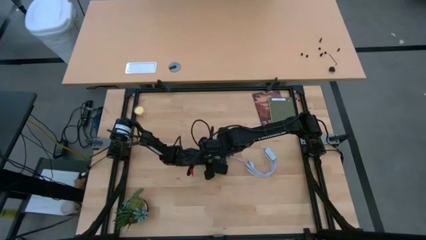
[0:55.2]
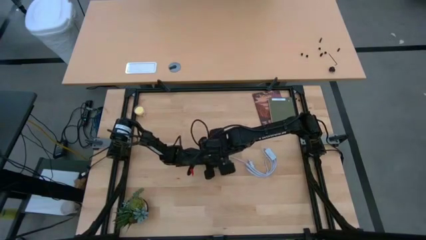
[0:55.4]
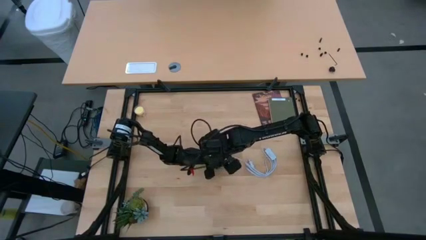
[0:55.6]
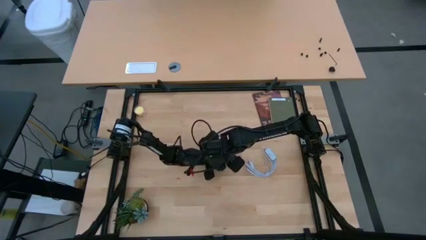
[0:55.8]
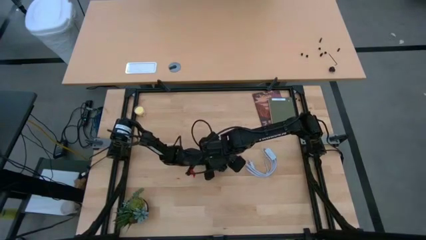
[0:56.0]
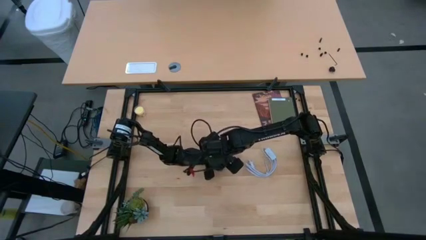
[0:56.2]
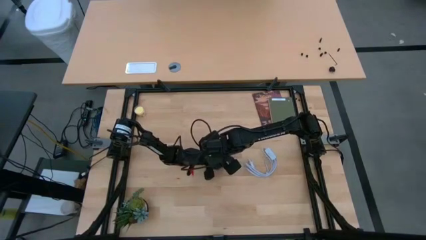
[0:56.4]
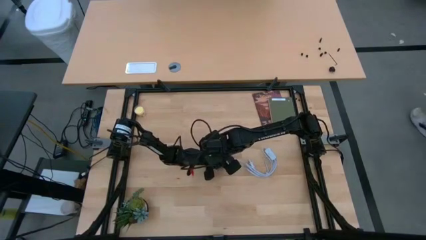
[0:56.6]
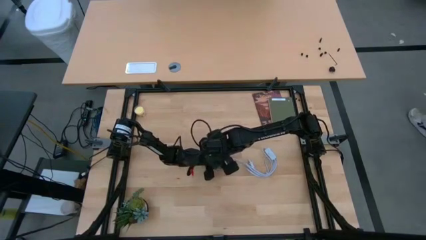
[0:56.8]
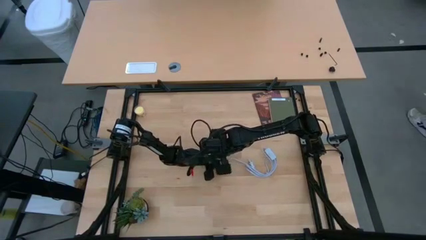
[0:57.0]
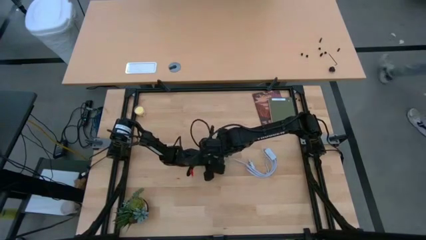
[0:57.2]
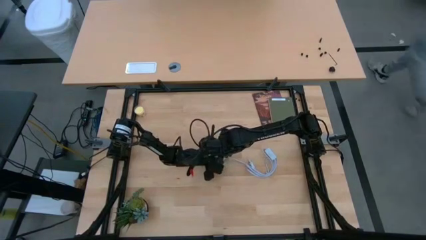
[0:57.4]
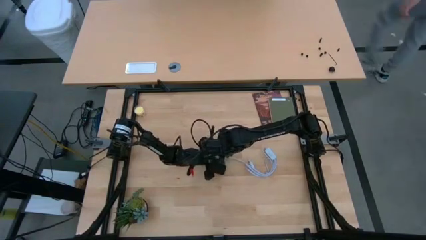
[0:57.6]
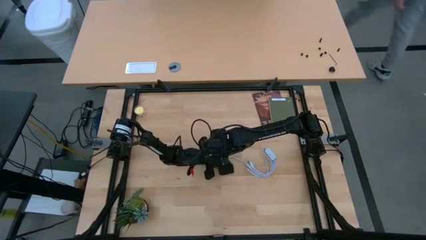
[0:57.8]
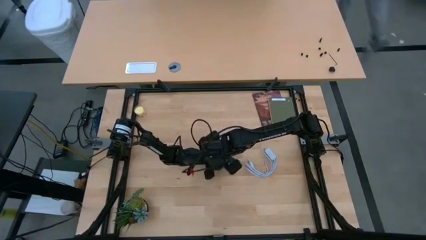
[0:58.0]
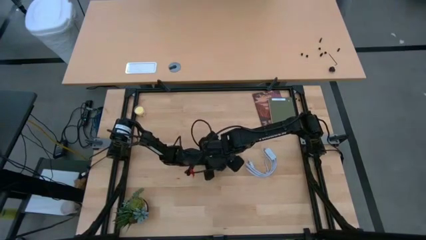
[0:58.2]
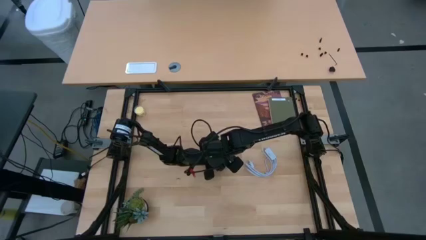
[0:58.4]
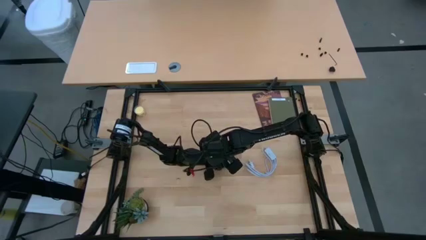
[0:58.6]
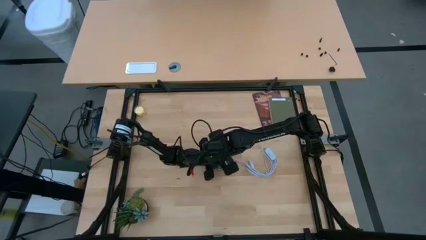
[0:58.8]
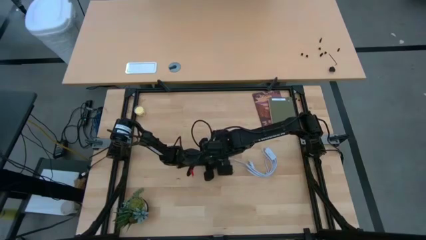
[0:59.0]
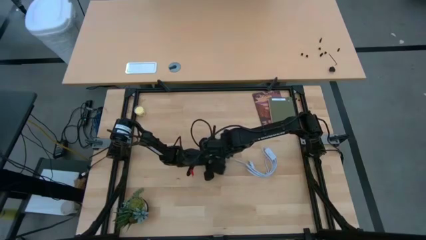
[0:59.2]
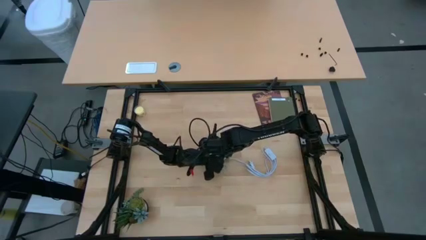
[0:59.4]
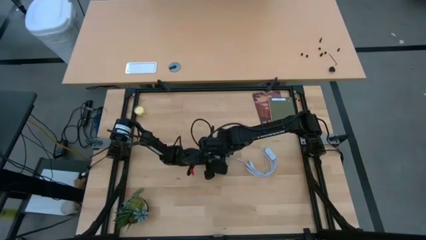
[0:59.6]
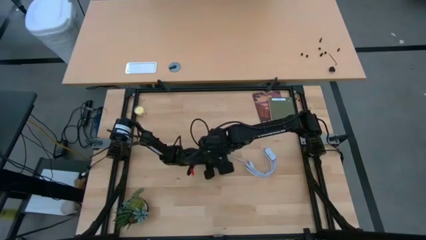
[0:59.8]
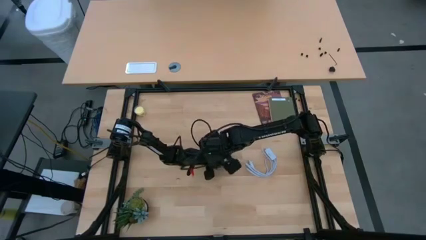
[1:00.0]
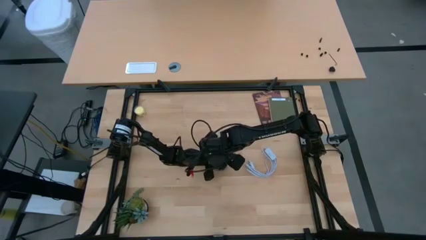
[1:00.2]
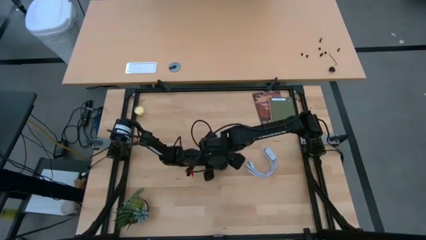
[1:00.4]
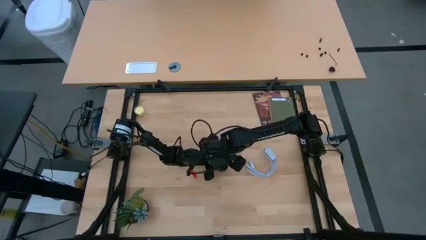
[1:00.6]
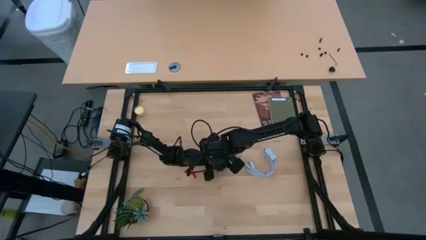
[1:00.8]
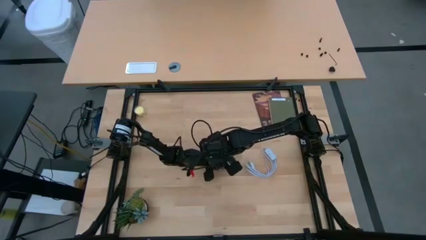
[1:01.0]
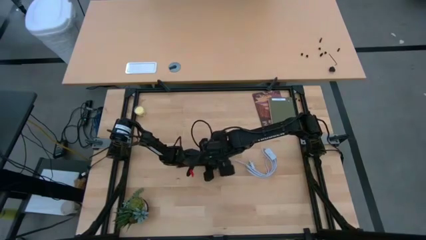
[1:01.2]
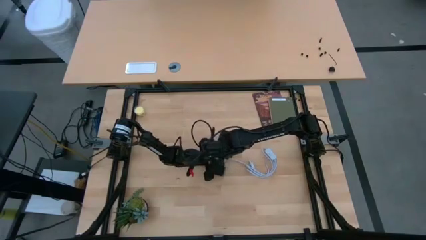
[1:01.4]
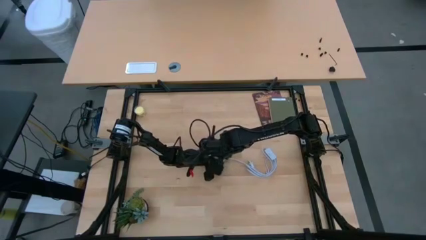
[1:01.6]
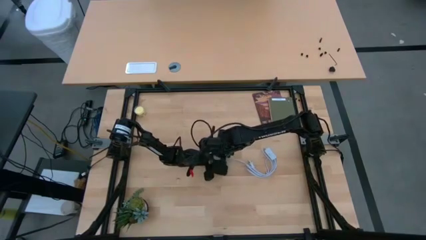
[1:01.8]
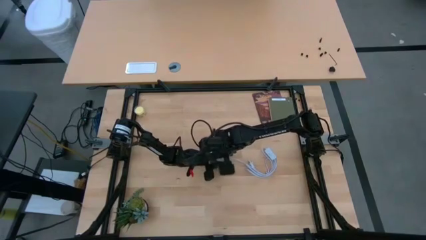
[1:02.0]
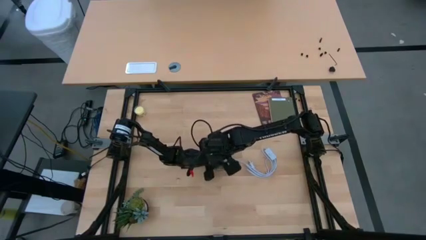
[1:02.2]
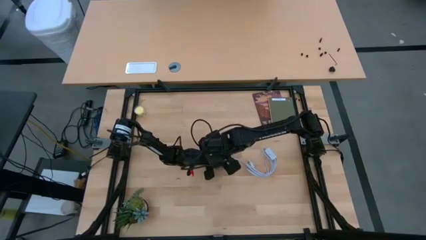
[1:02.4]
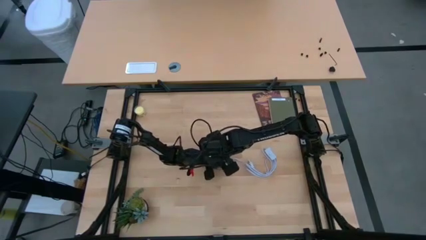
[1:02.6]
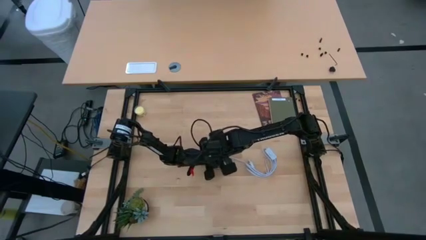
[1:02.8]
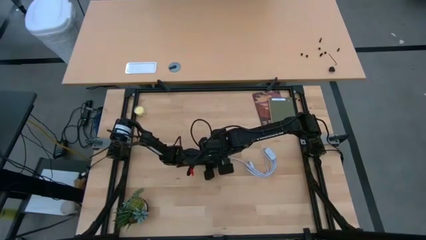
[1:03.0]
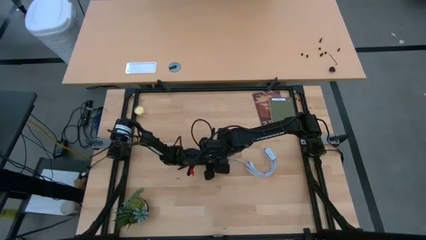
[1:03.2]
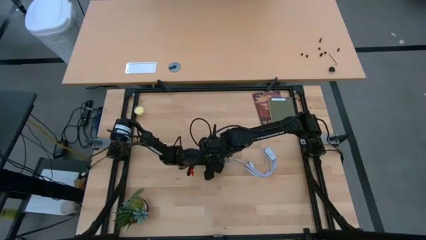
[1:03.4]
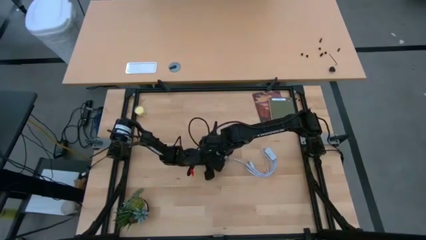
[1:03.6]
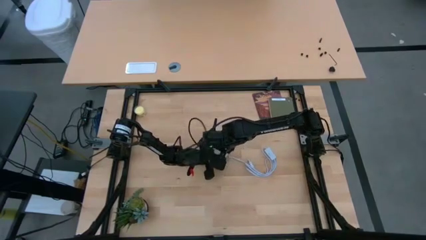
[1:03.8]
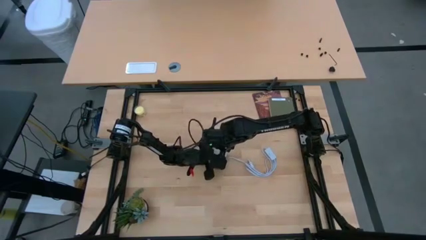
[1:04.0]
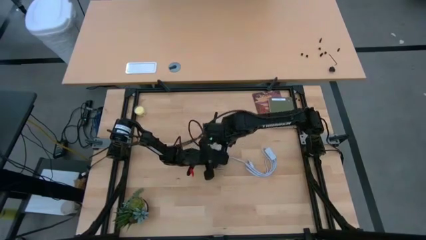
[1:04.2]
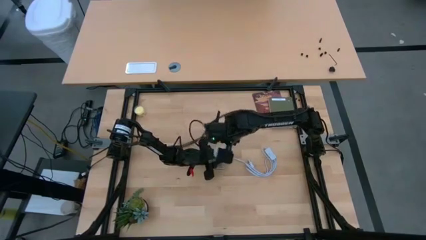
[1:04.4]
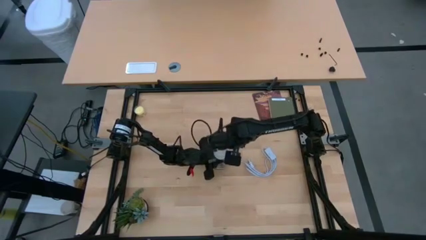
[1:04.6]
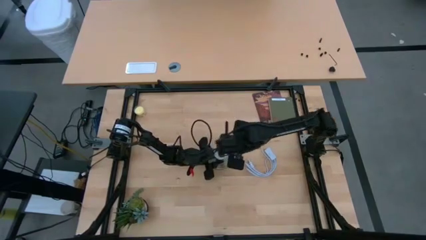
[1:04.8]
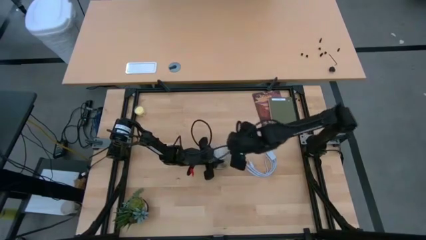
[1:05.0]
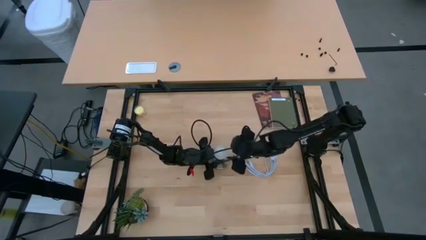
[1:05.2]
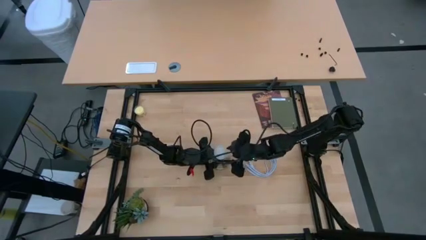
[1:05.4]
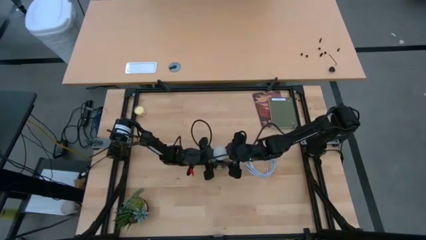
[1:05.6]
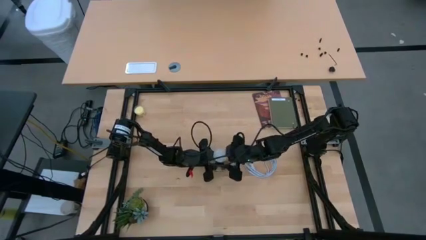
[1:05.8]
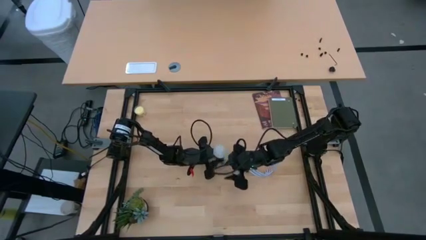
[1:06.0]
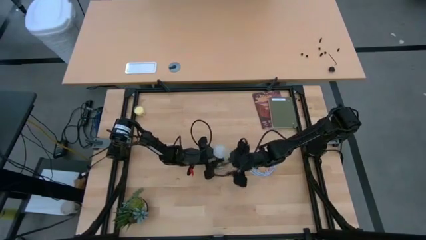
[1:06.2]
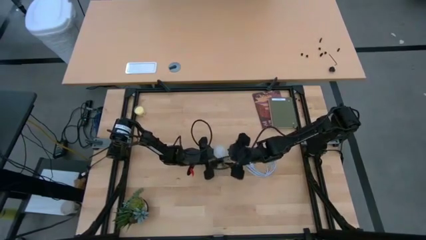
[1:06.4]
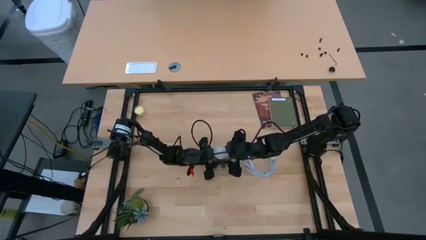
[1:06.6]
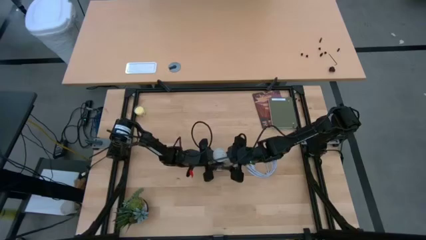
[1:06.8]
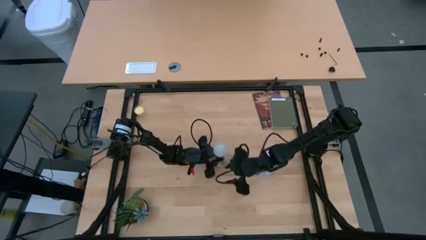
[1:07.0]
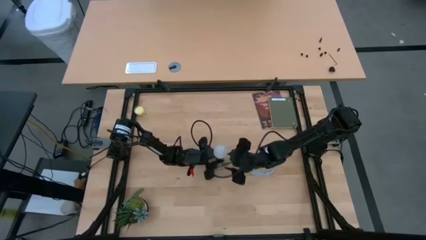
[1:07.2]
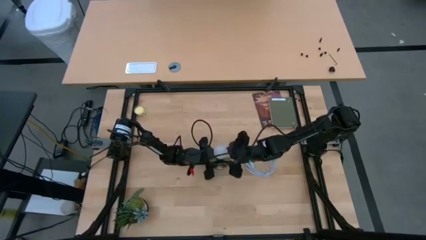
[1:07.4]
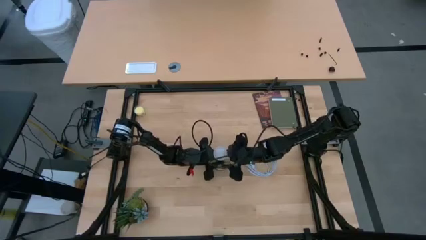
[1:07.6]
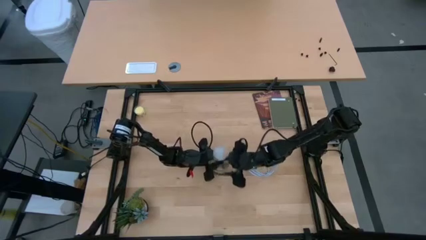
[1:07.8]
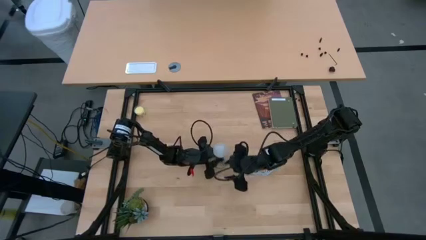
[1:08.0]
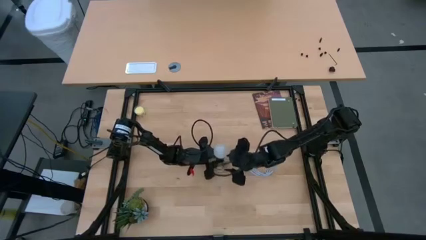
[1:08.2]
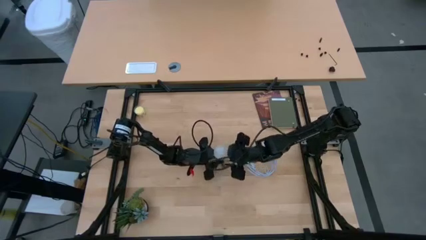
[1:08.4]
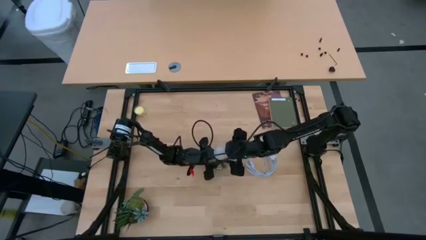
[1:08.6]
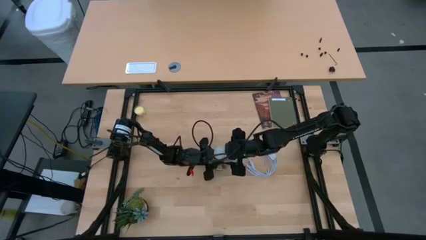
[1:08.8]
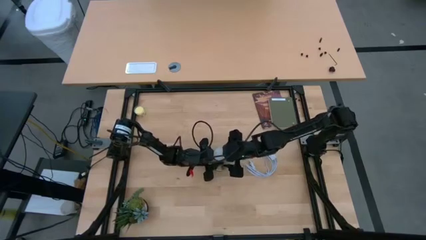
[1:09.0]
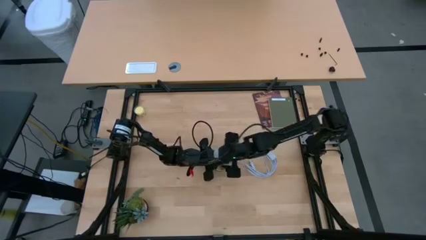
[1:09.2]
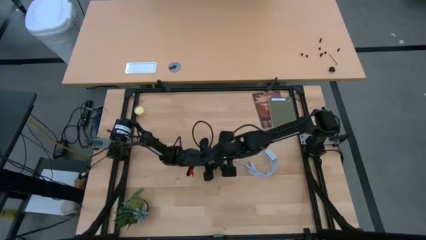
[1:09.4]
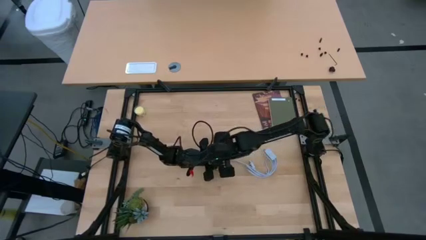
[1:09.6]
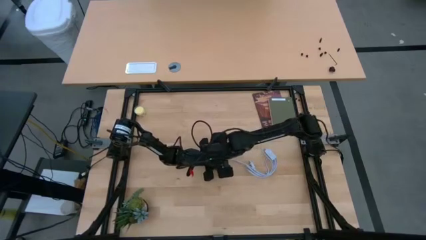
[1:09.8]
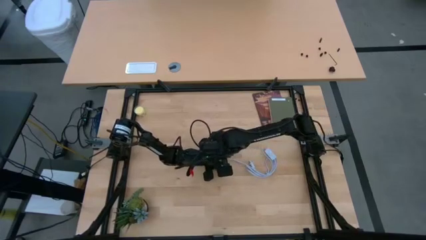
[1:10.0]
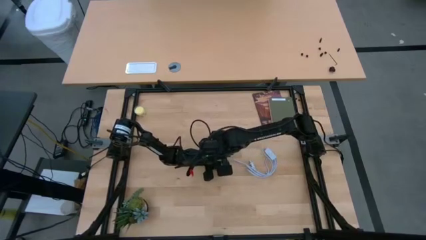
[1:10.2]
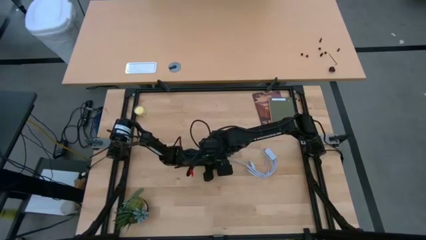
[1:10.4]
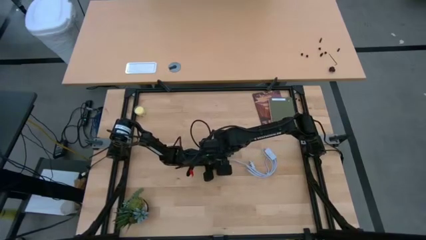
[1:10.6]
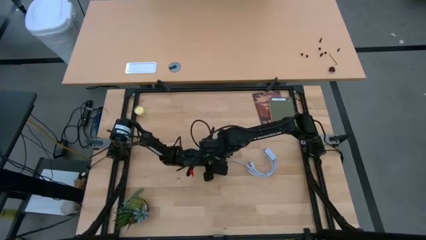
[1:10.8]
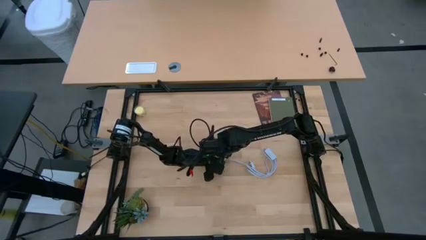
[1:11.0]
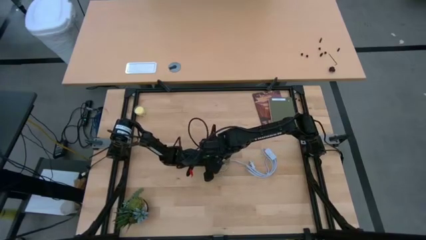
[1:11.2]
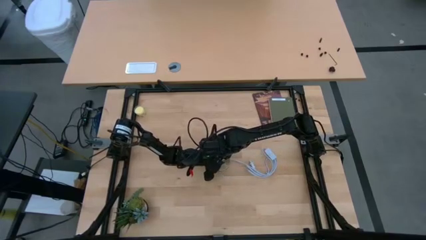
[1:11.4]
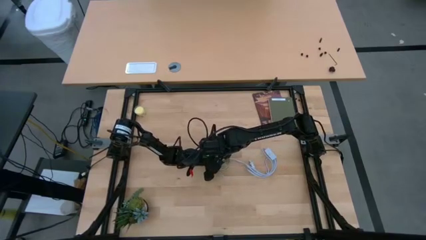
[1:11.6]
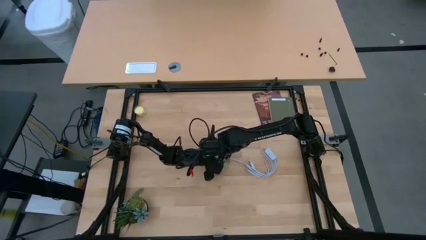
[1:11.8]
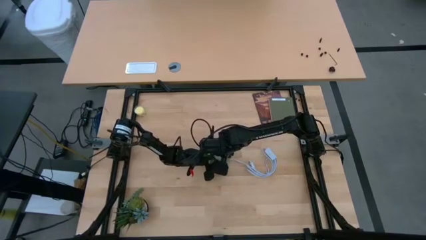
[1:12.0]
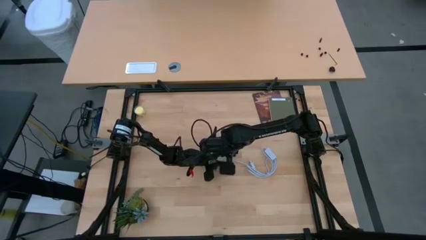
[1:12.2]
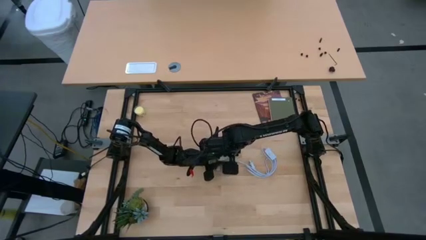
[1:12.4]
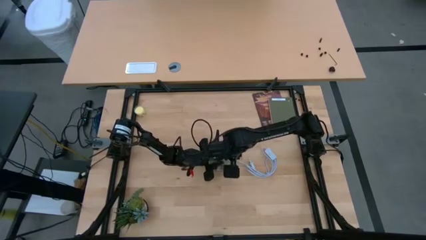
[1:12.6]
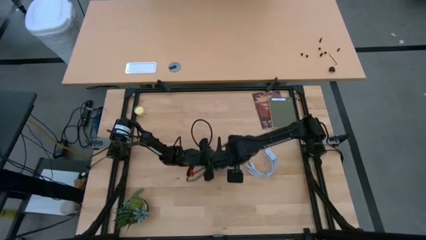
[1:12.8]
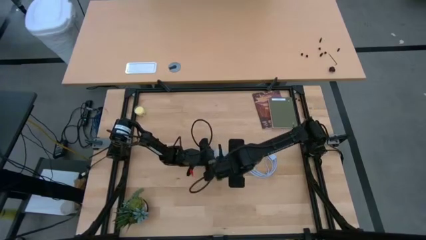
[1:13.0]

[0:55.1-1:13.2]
Task: Screw lightbulb
Insert the lightbulb into the lamp
